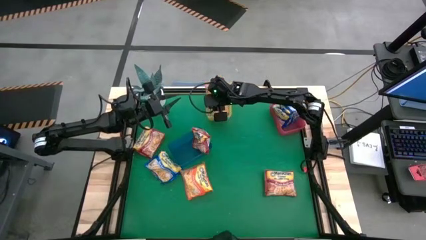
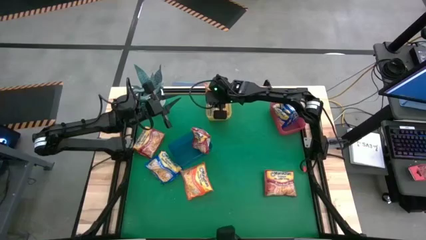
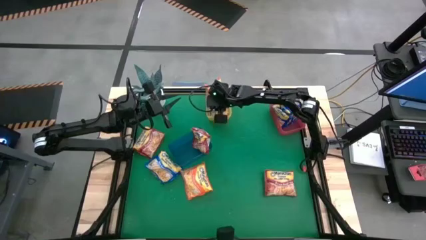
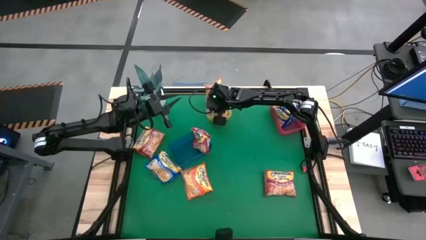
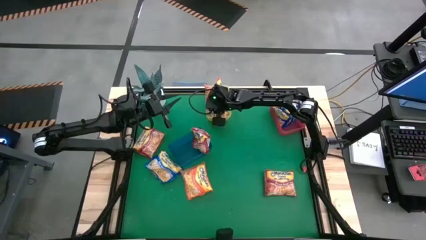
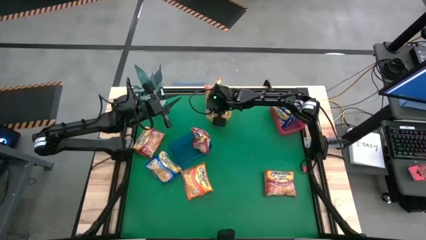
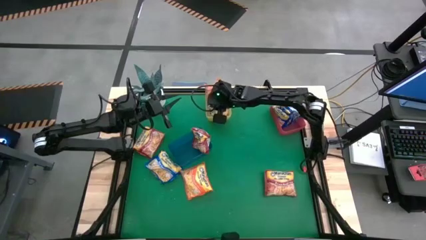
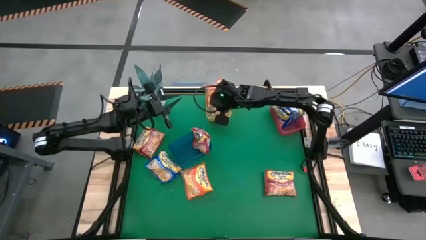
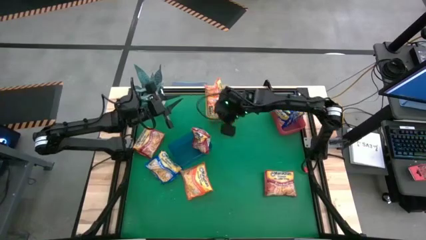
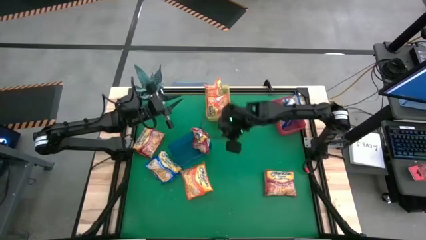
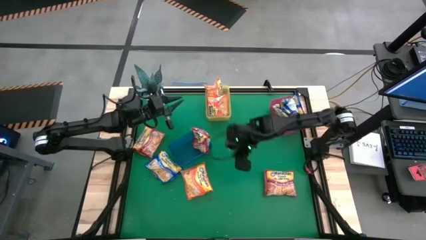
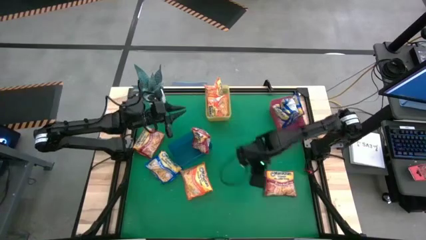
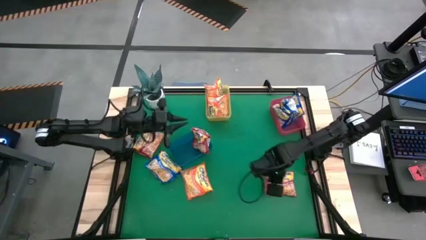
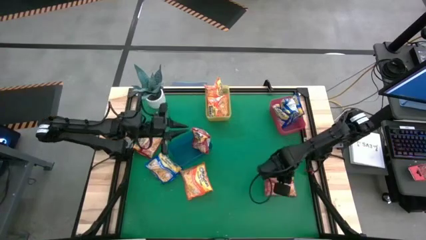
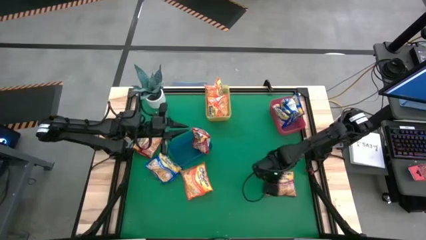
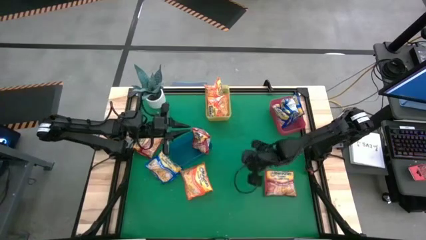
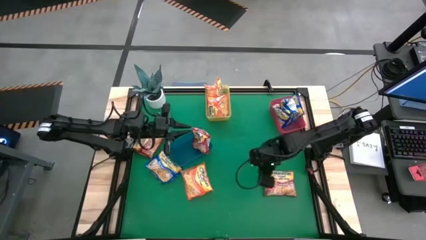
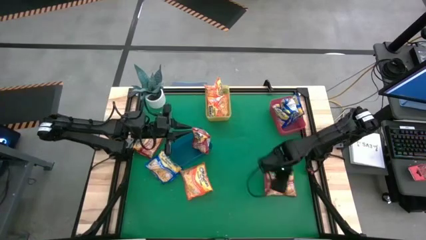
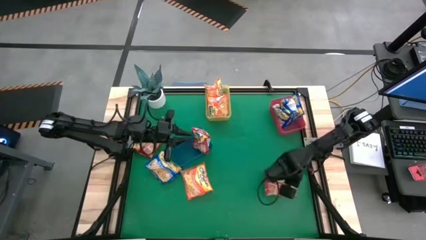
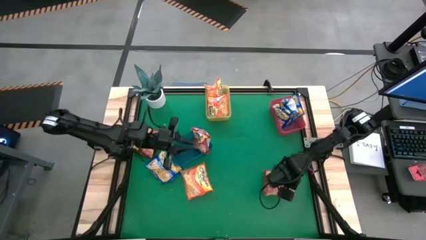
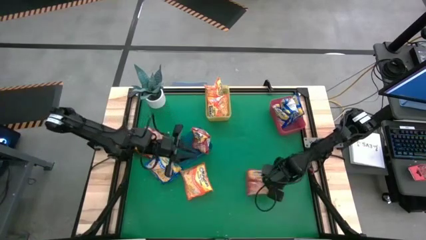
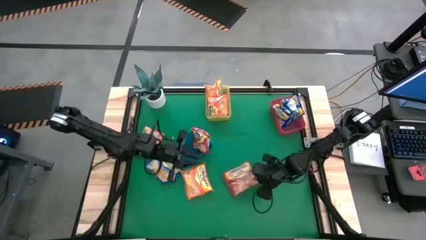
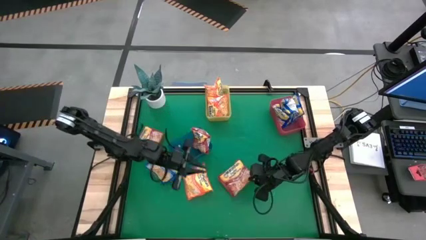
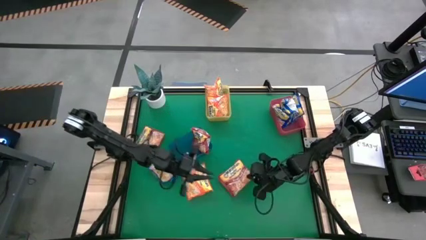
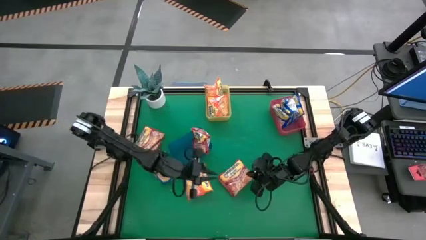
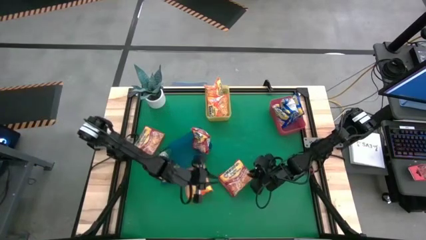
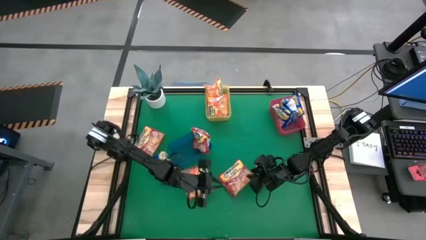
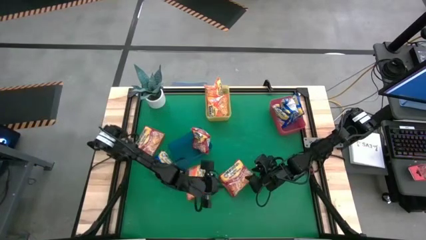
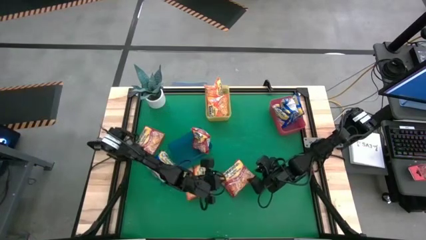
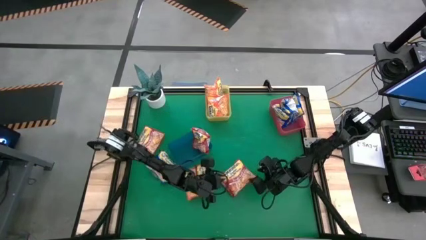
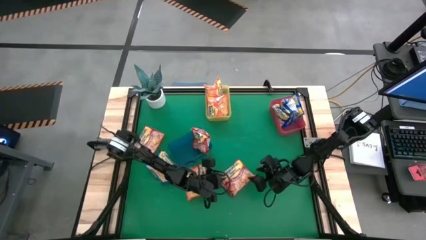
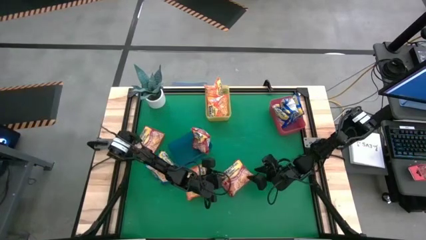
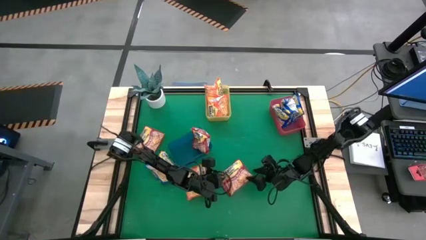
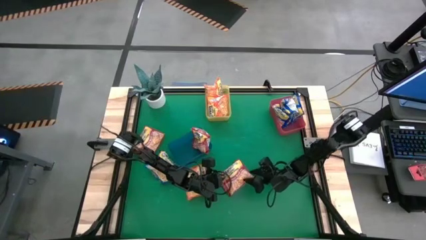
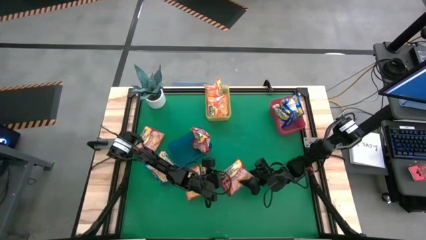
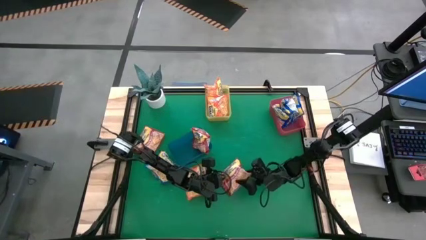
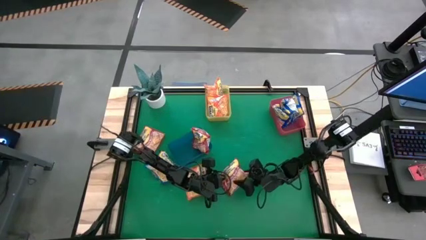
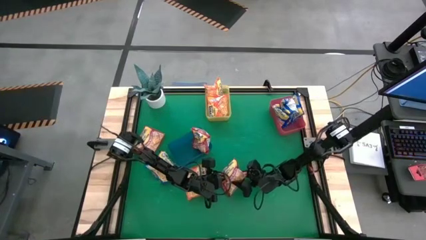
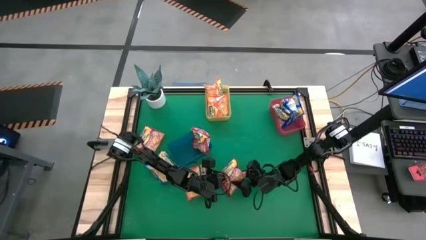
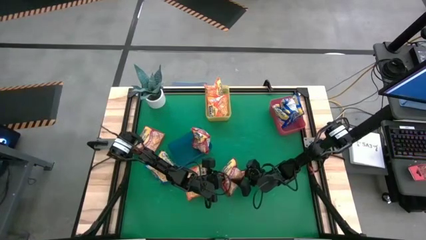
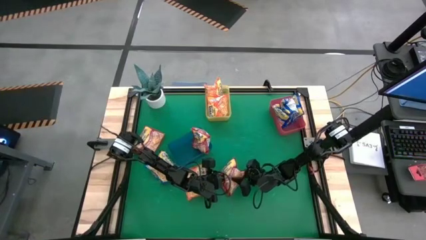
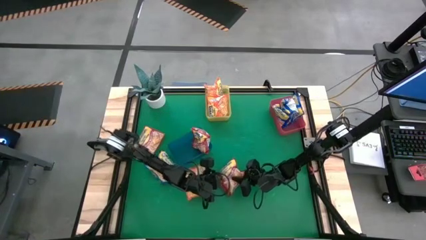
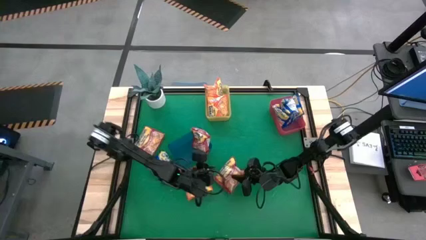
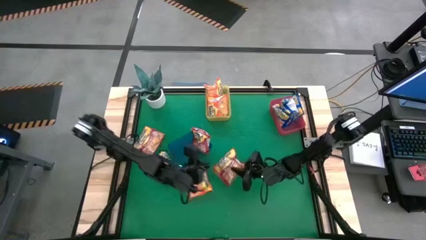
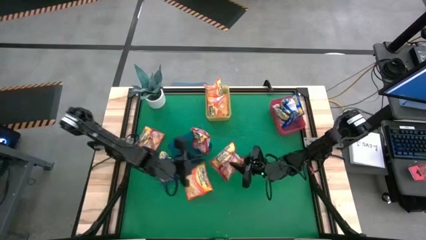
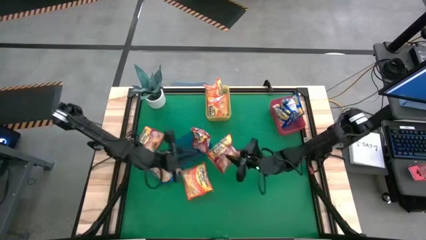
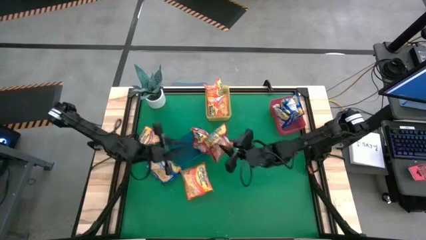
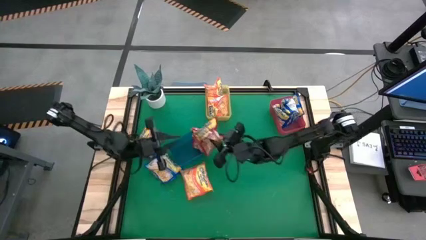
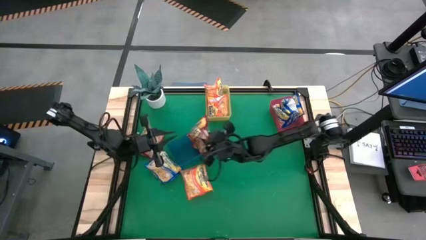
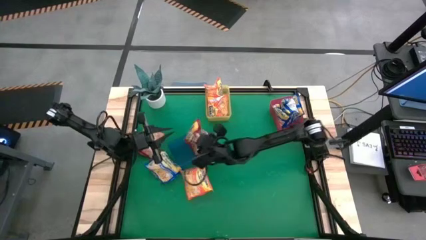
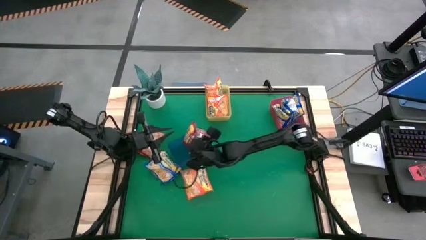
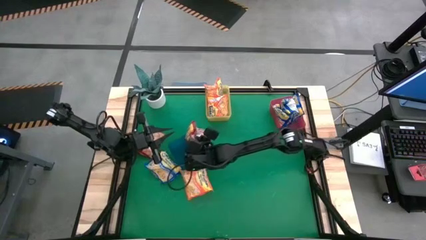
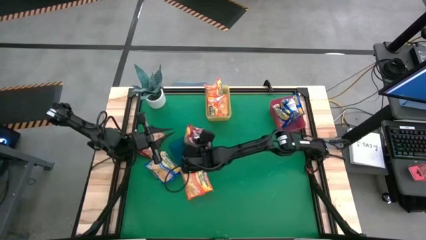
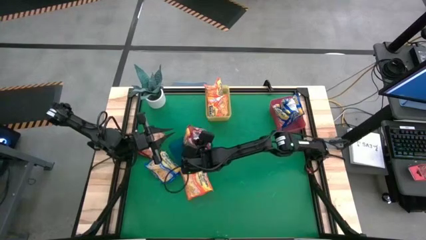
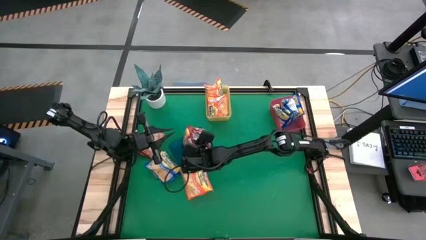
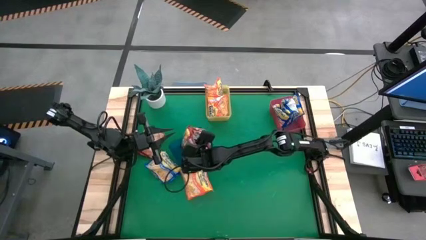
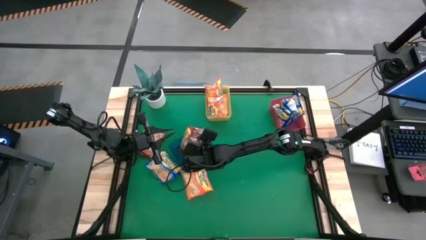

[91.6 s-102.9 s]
Task: Sort Maruchan noodles
Put the red noodle pack into the blue bin

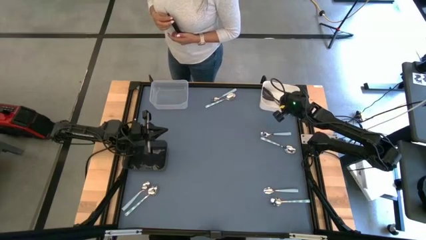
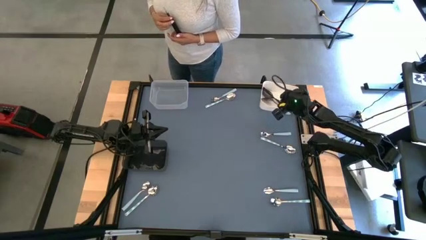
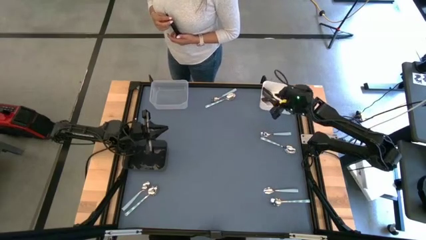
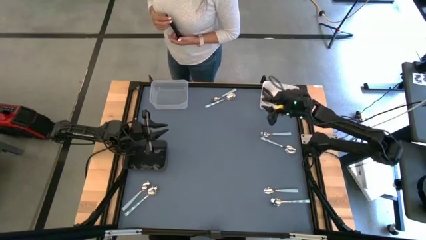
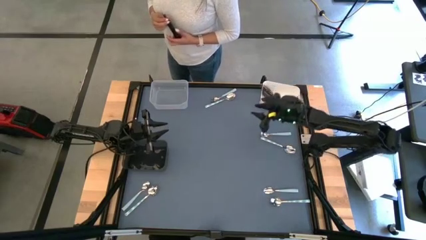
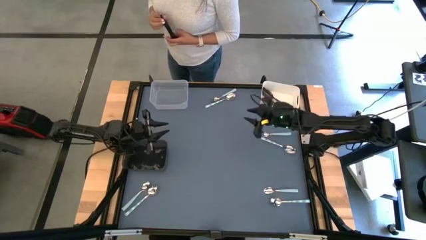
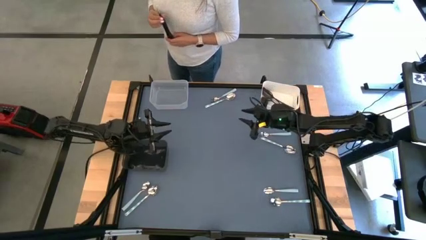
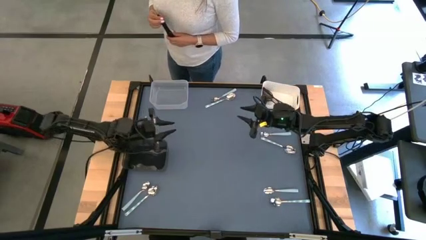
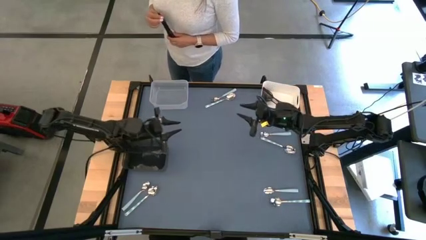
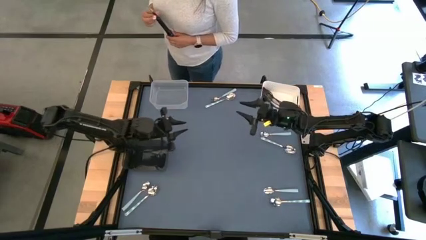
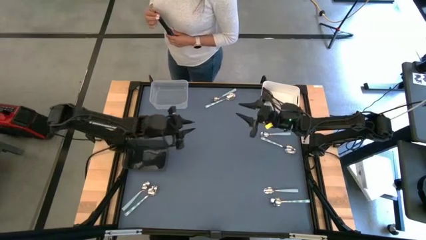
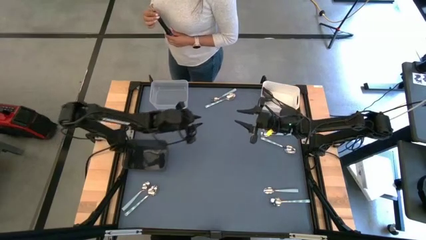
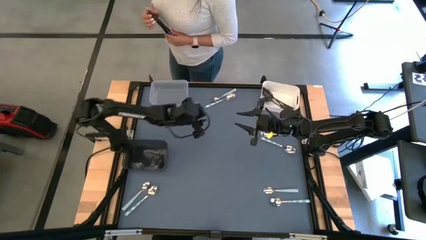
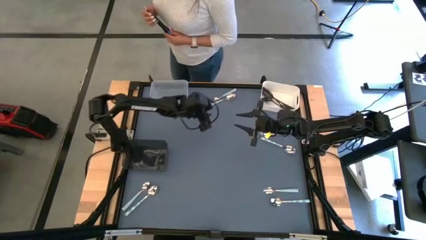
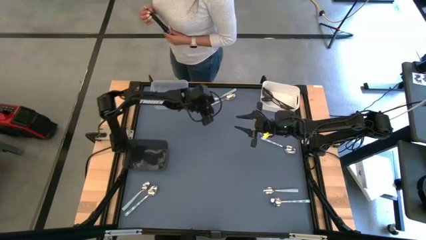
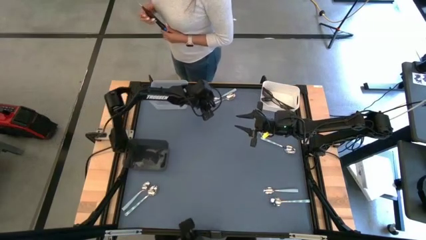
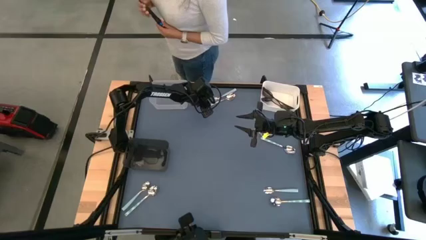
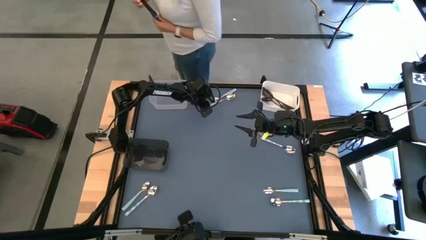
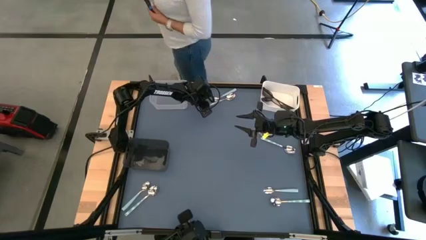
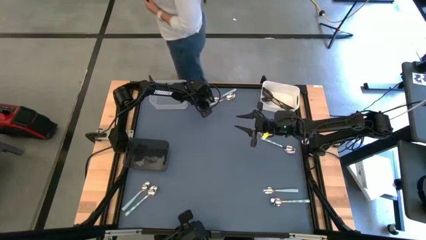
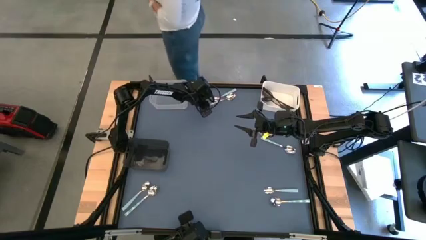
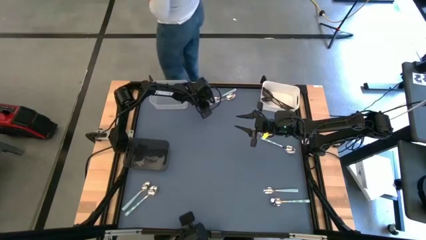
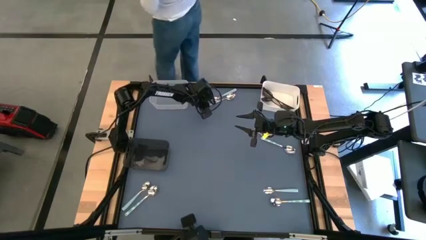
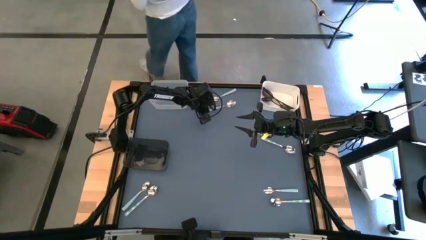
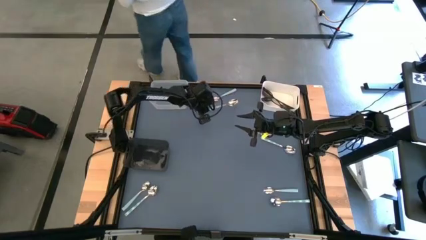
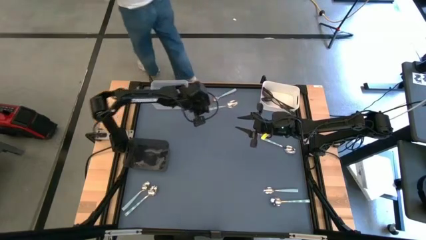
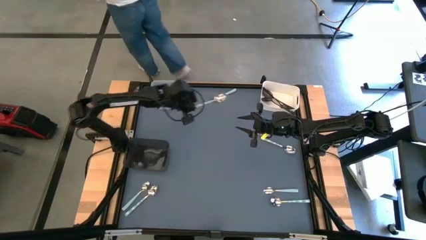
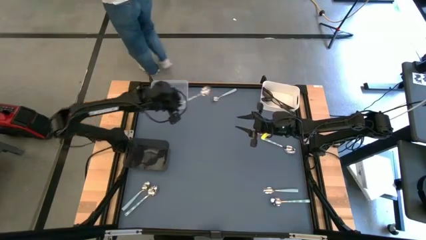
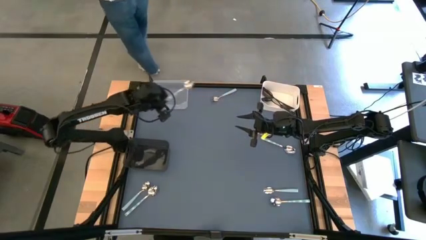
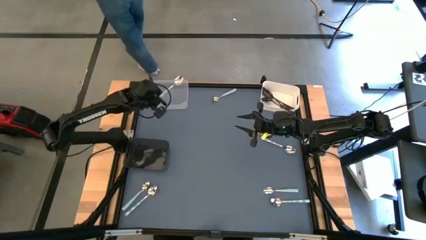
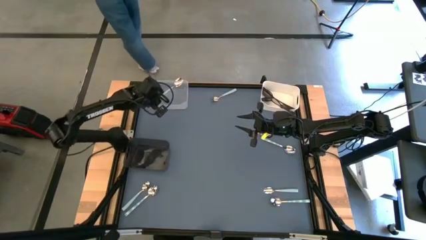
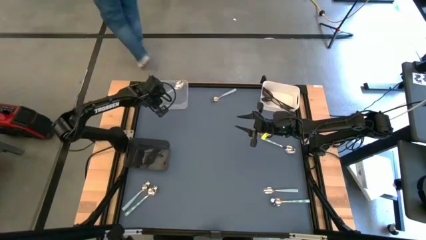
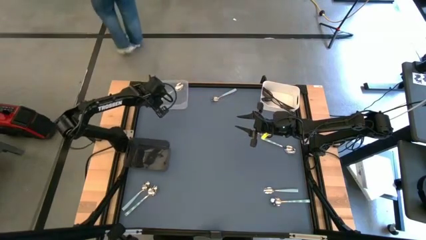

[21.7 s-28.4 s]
Task: Sort silverware by color (type)
Put the green spoon into the transparent bin
